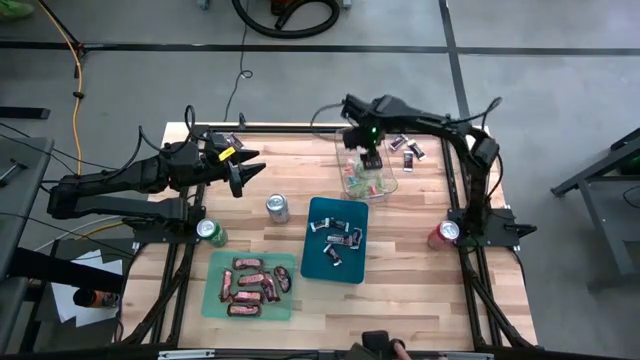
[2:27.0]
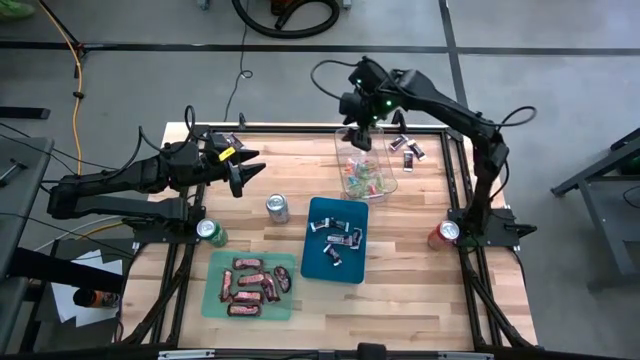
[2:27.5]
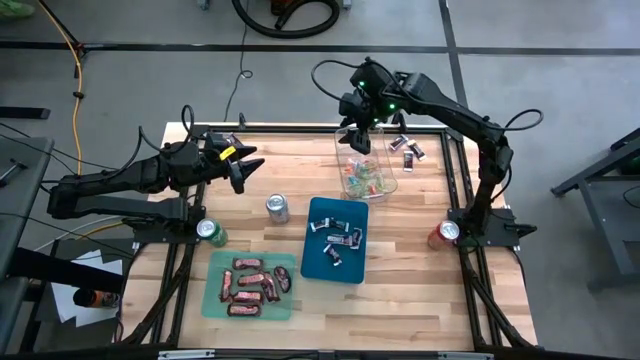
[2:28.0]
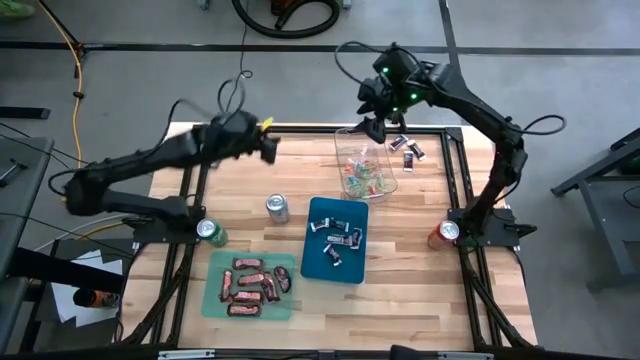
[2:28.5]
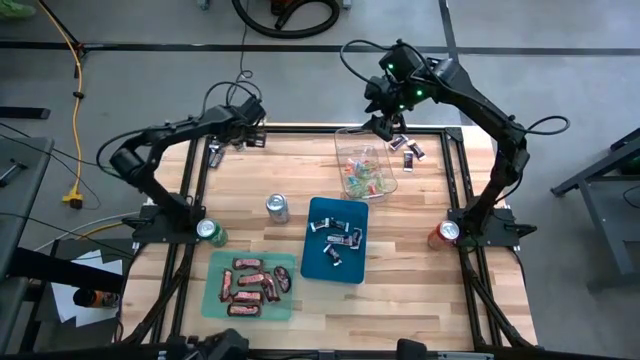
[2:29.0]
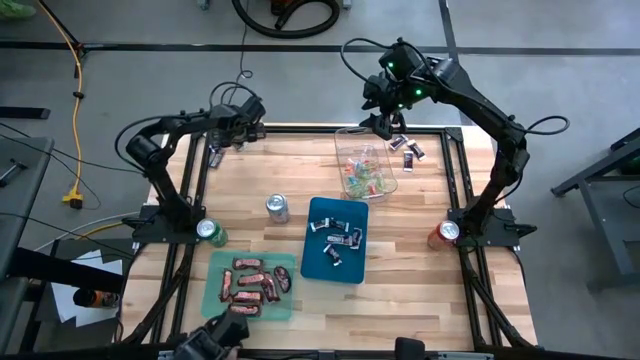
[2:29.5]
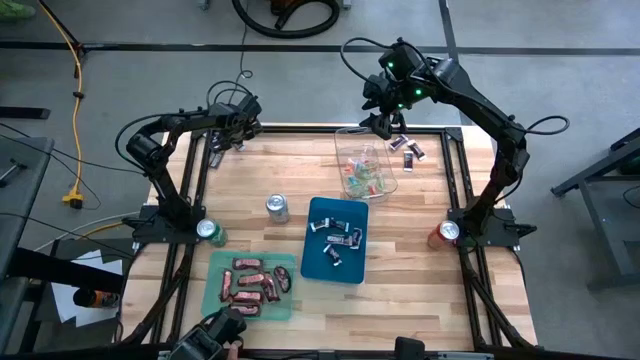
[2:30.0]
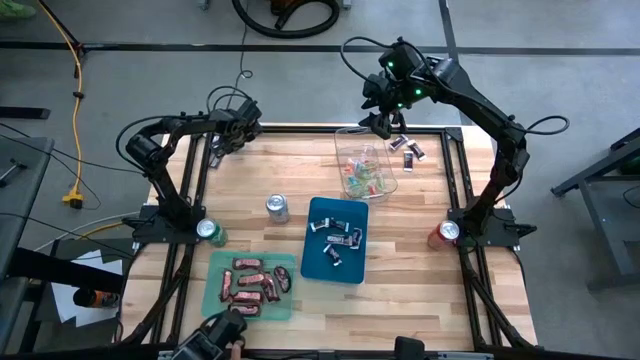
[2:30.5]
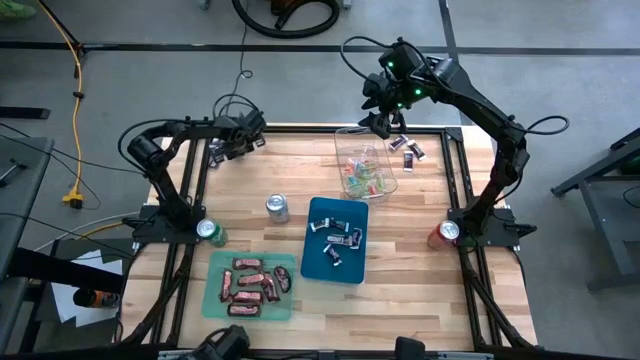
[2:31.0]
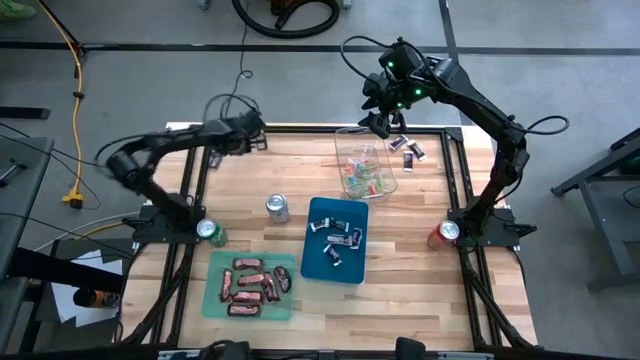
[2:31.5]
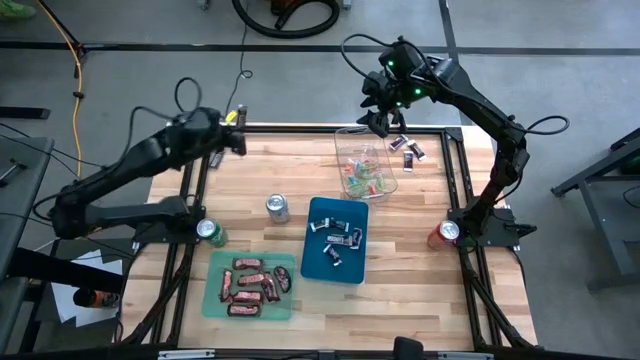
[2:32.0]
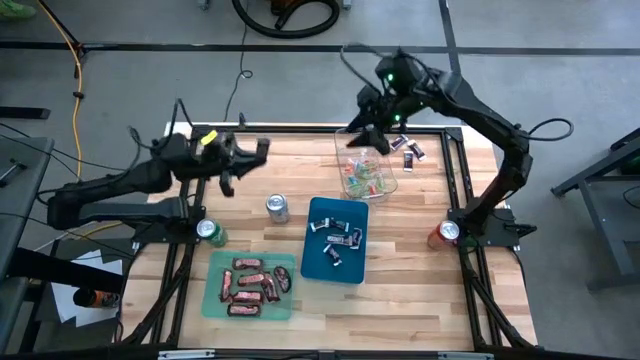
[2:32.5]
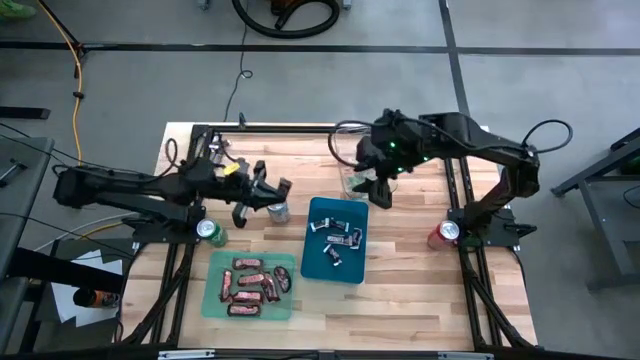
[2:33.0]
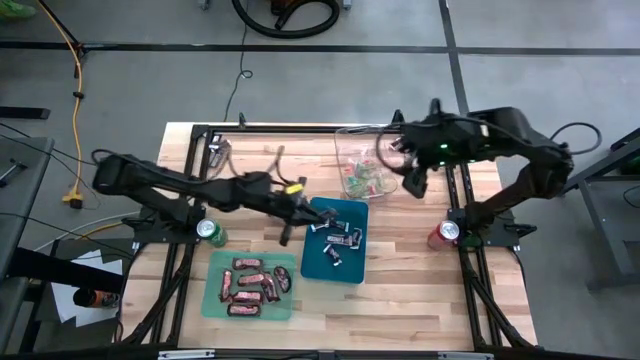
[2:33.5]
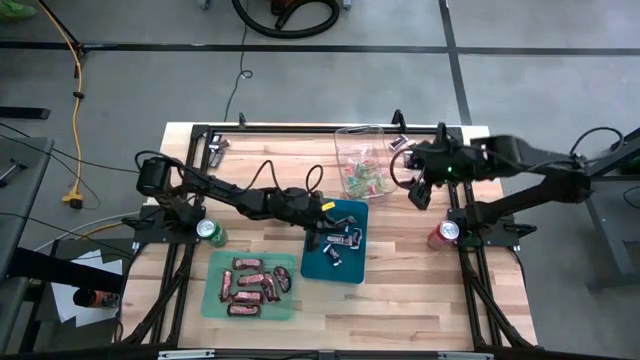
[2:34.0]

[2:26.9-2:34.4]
Task: Sort candy
Put the brown-white chocolate into the blue bin

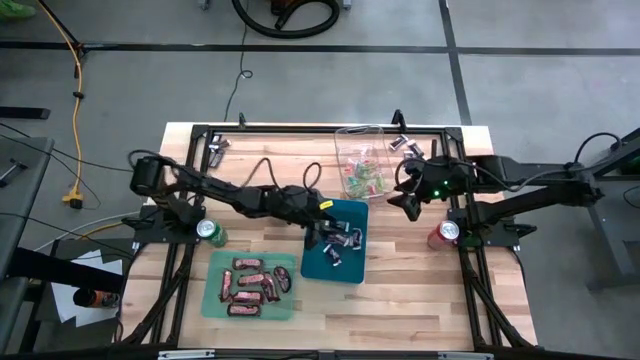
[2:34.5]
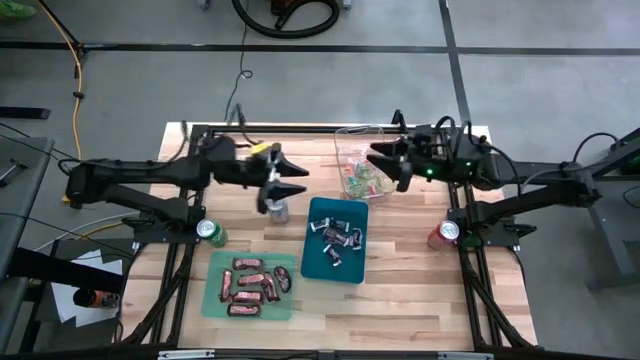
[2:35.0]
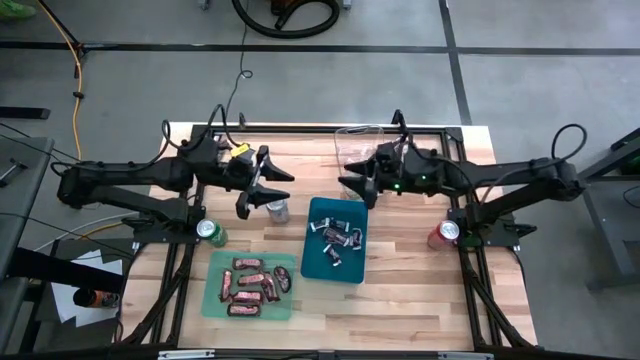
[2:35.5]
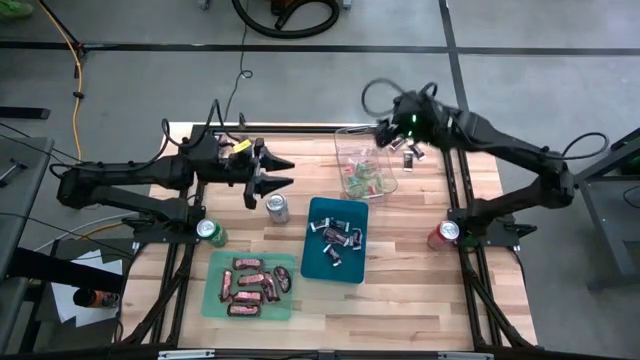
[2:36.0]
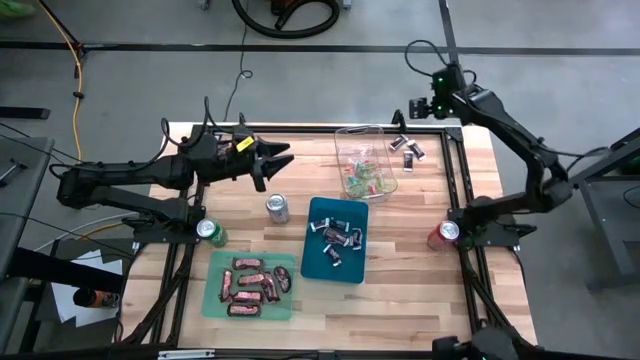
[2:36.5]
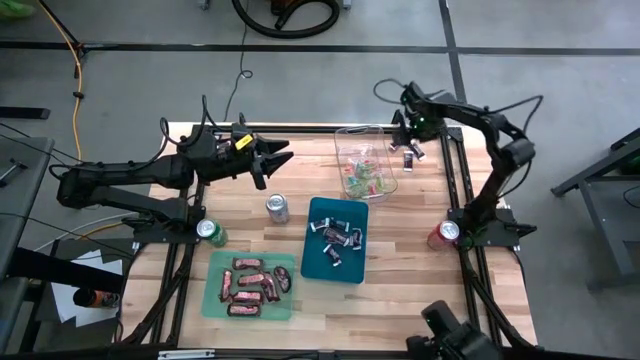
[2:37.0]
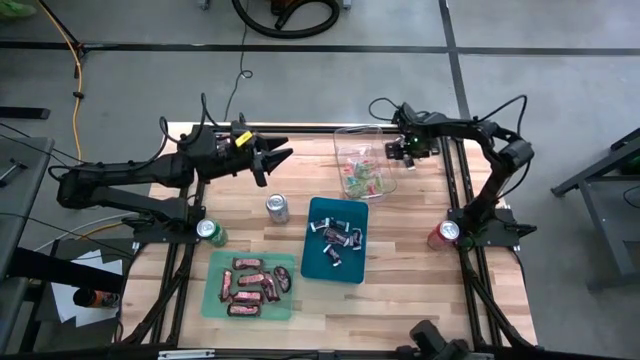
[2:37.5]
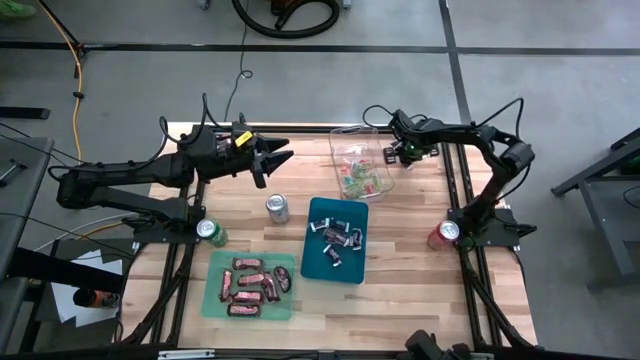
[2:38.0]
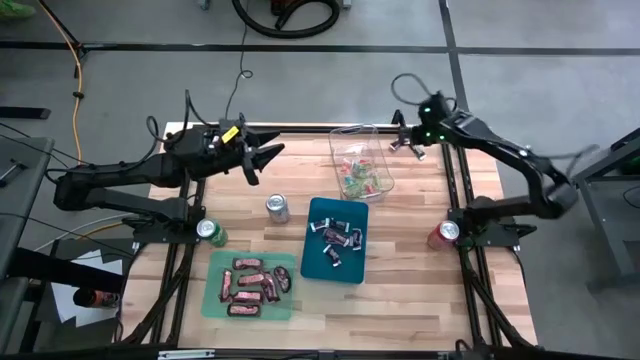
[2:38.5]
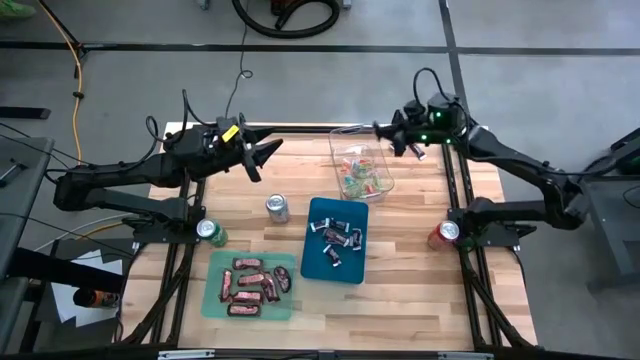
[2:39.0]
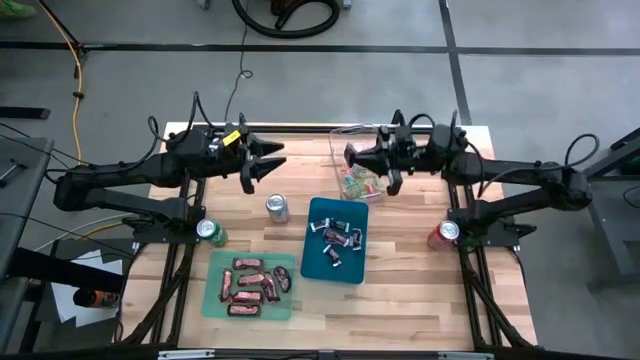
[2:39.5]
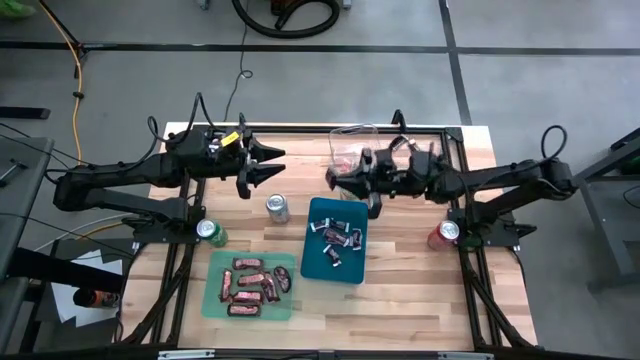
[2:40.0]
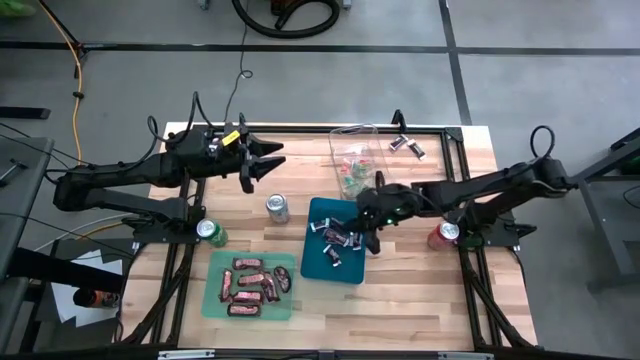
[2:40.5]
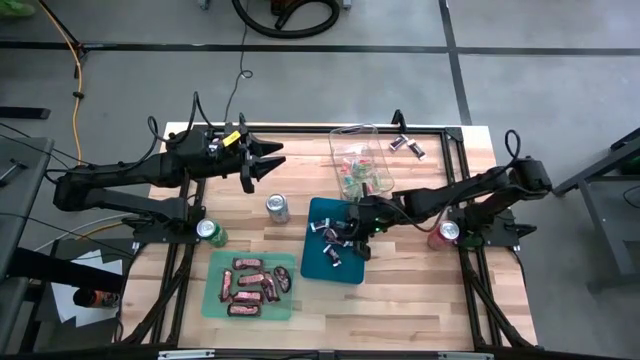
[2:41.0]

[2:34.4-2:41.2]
Put the brown-white chocolate into the blue bin

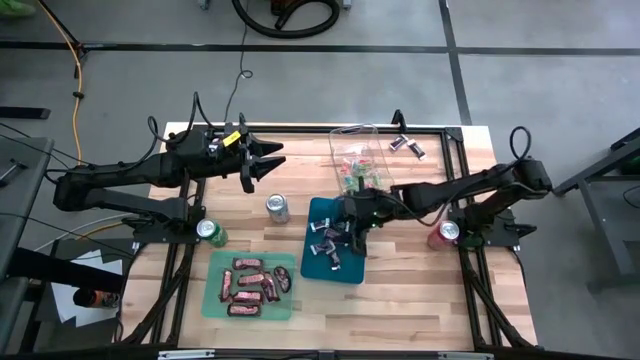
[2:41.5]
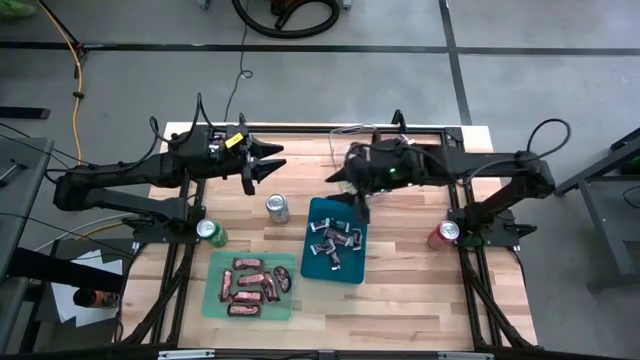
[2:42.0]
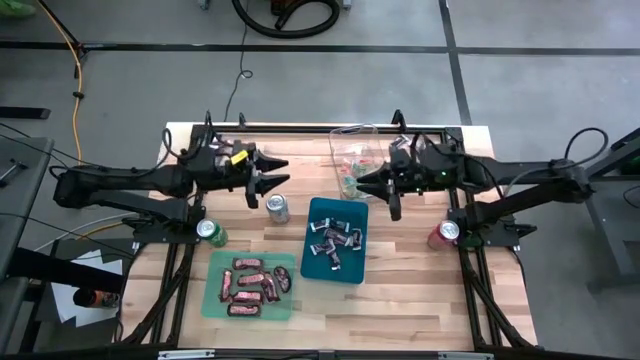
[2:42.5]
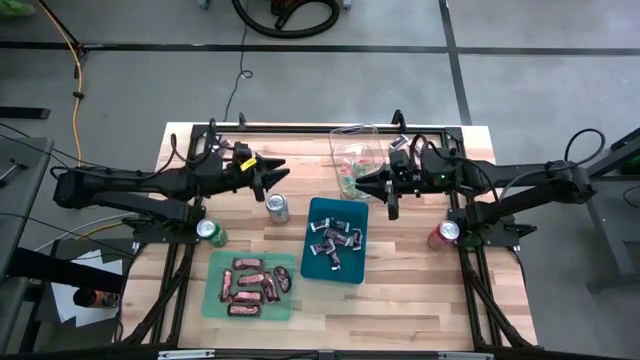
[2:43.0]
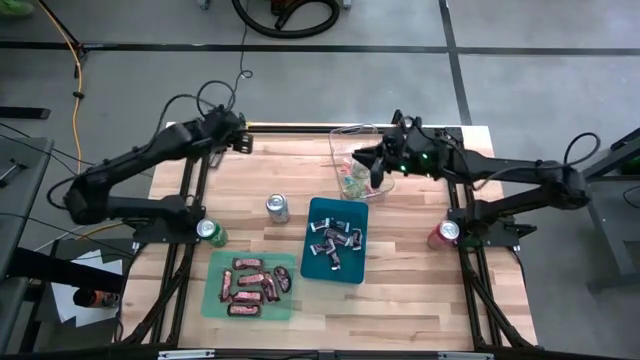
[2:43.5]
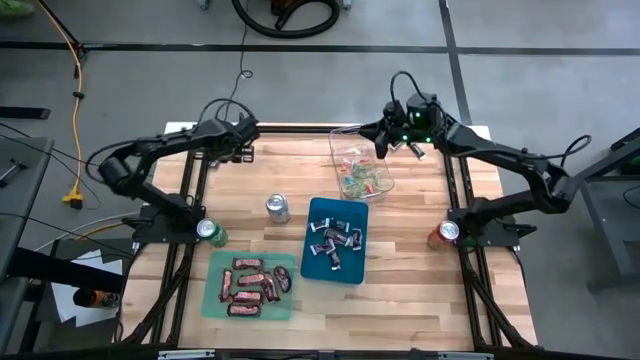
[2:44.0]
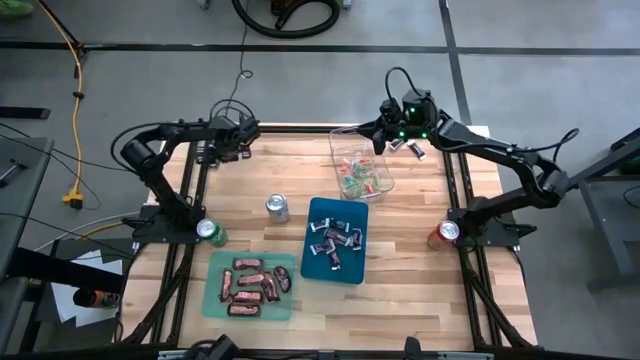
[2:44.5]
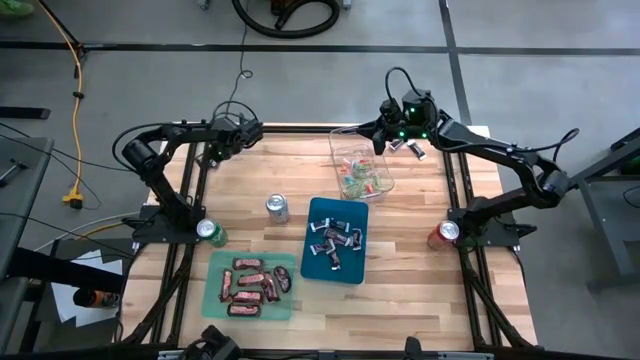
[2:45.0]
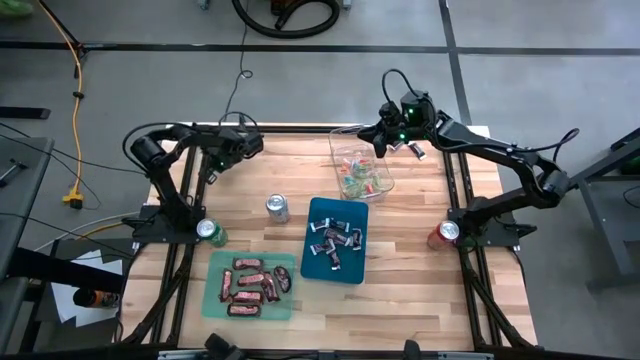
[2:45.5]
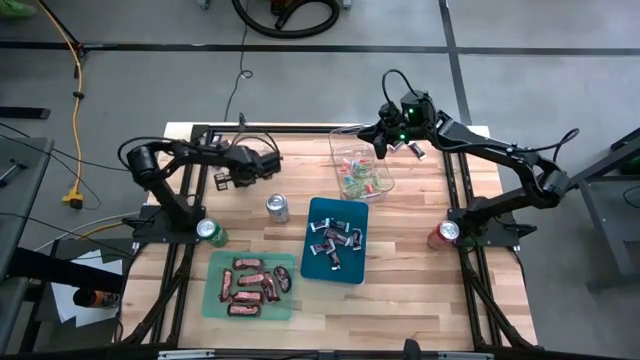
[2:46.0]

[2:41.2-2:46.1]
Put the brown-white chocolate into the blue bin
